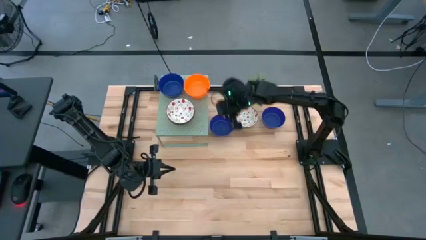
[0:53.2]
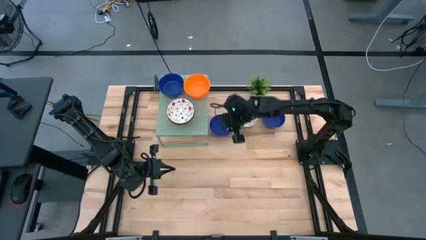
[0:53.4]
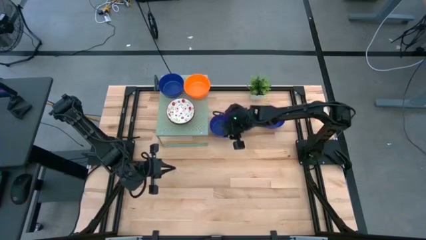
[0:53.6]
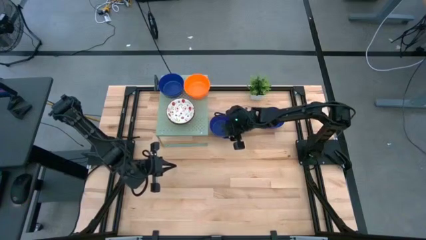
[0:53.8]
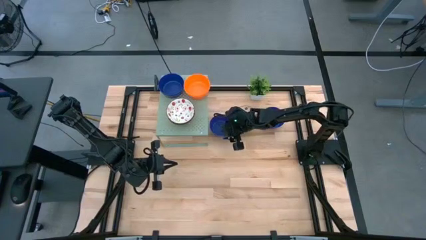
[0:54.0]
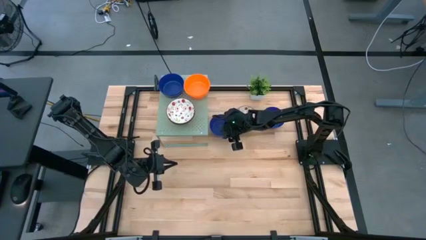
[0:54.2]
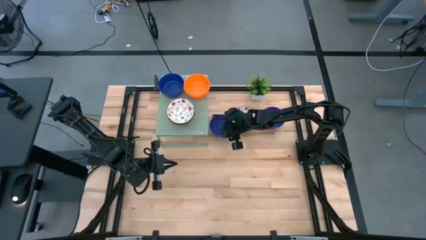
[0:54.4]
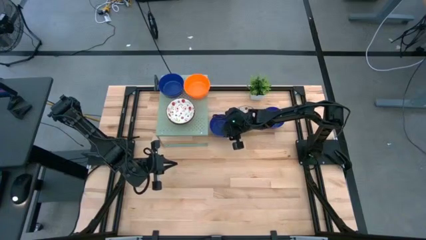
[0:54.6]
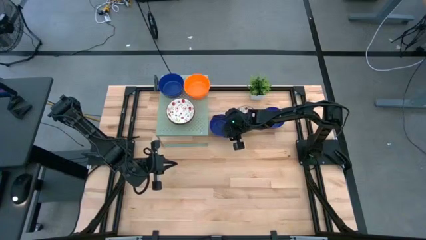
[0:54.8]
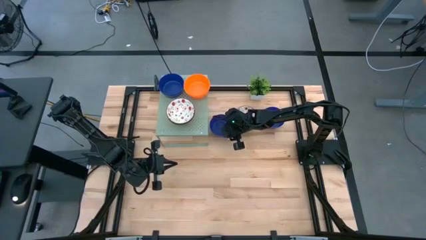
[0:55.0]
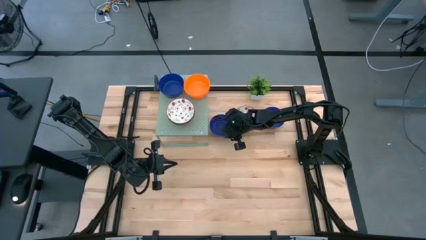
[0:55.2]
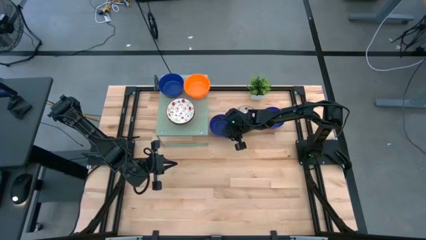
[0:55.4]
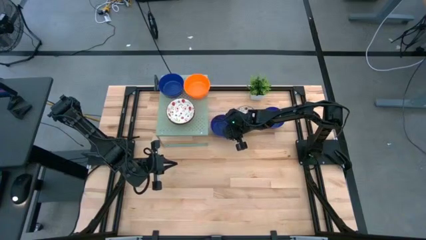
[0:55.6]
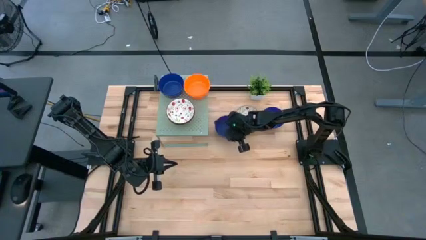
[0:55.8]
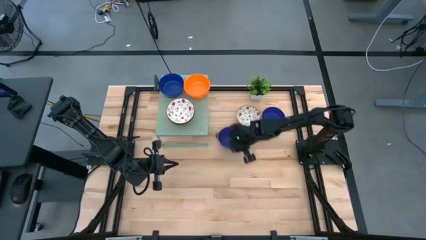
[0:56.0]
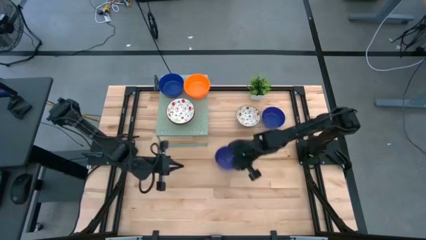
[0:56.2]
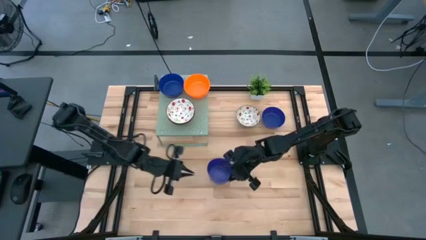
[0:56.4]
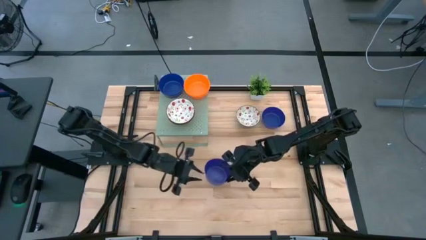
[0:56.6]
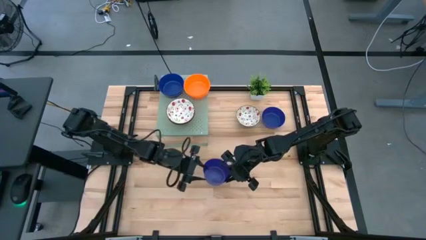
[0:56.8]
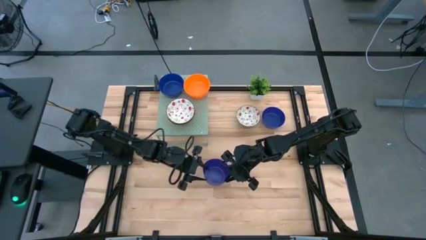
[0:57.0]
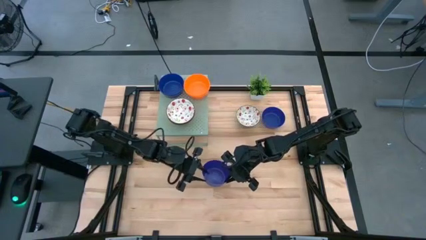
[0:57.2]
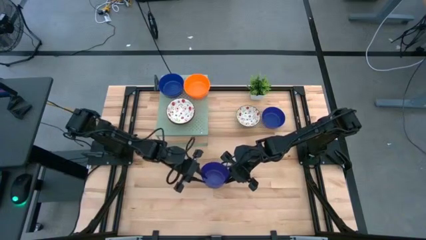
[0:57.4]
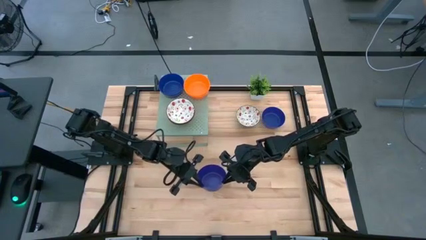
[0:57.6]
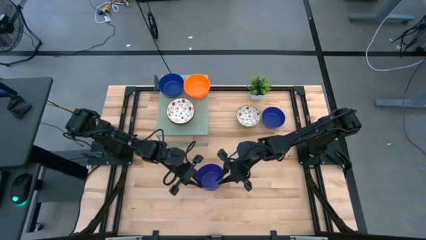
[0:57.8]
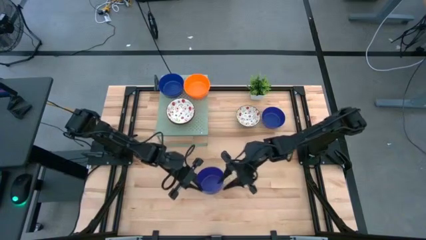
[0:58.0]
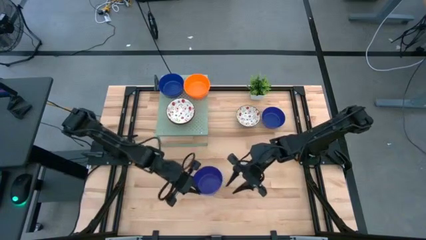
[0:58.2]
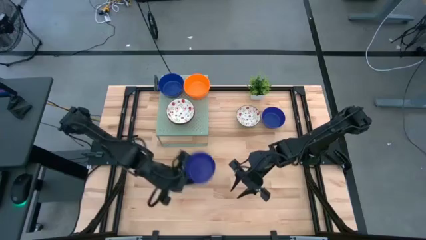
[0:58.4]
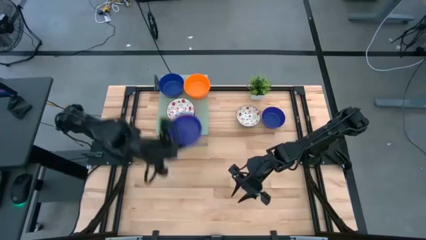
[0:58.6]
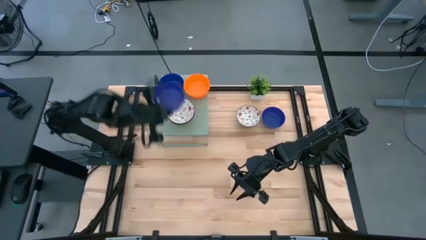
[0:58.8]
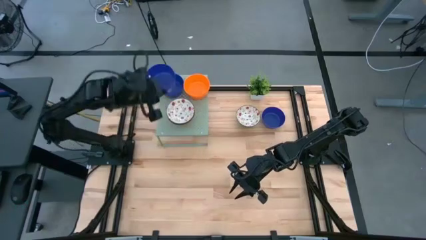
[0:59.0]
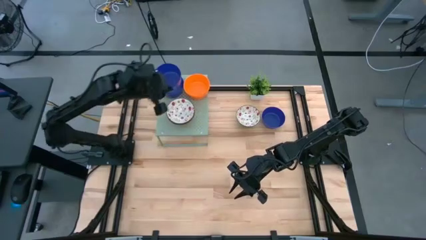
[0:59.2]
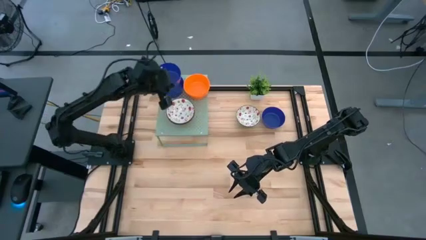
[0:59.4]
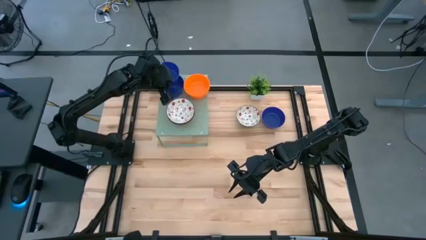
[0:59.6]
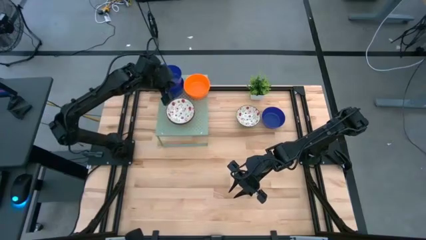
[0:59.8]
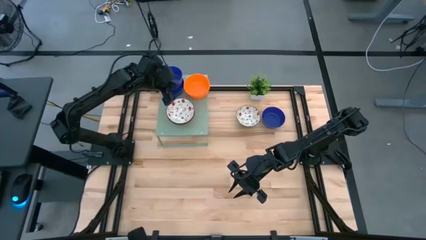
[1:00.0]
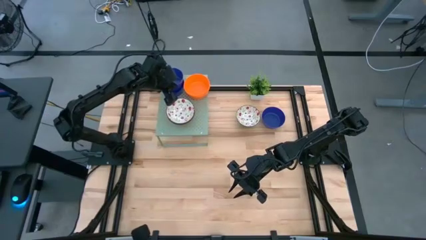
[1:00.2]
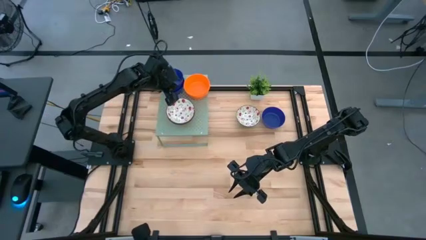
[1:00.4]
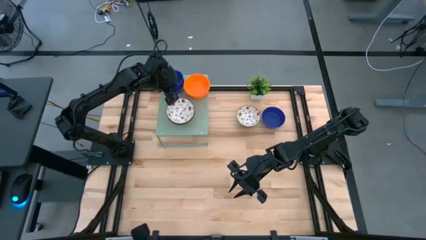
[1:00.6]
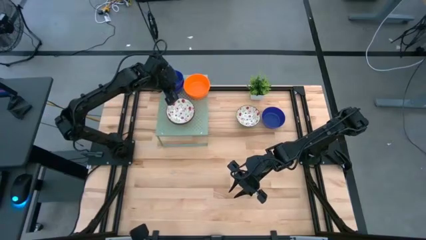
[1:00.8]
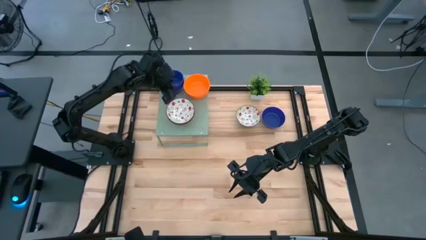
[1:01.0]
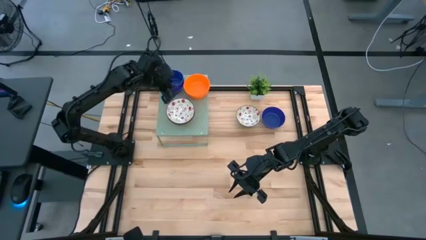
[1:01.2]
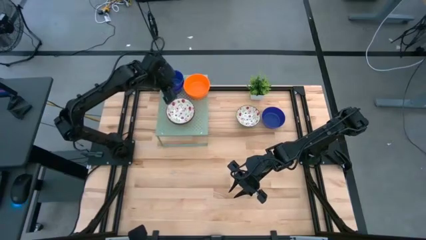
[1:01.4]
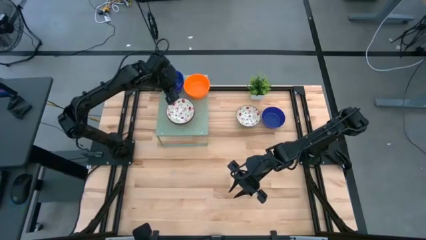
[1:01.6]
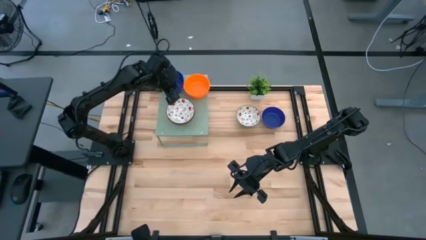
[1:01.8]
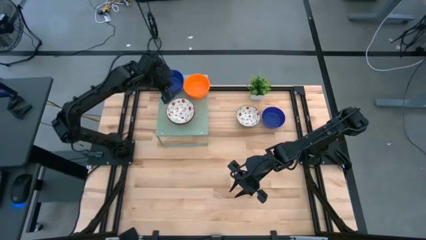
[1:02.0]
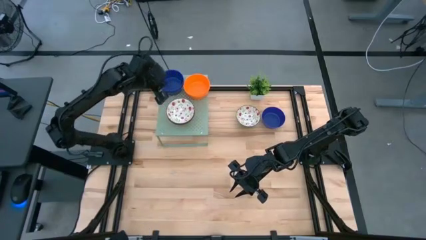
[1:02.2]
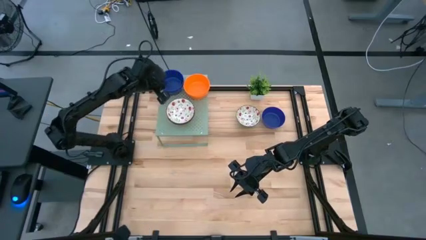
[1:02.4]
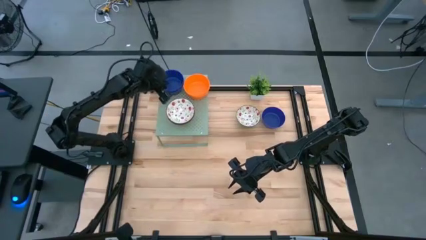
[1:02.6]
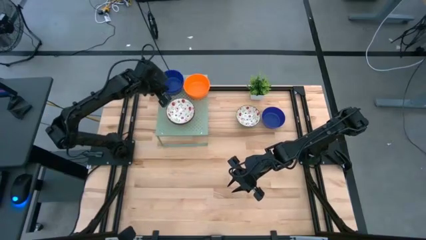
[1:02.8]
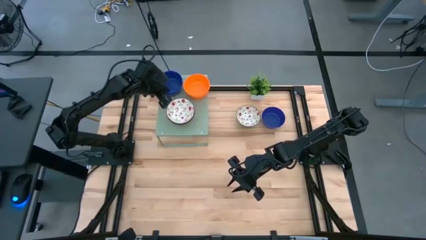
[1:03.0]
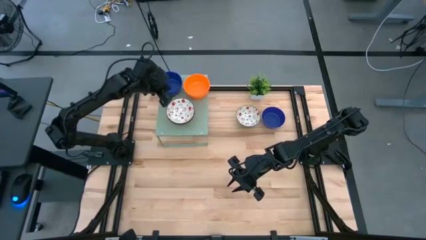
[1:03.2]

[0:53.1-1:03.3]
Task: Pick & Place Mini bowls
Stack the top left blue bowl on the stacked blue bowls on the shelf

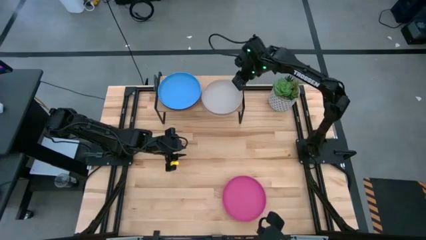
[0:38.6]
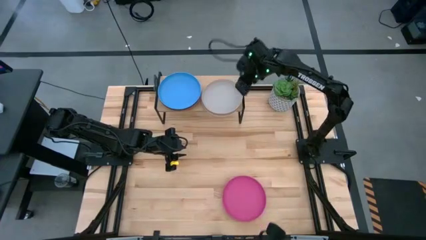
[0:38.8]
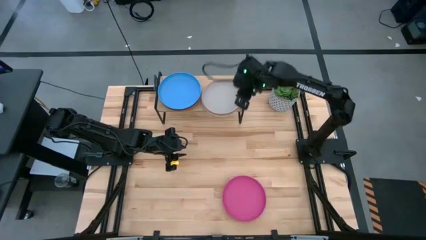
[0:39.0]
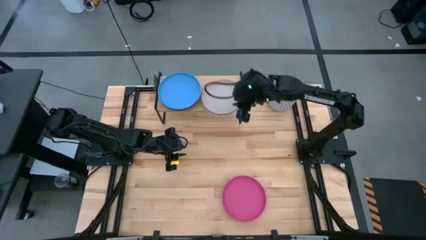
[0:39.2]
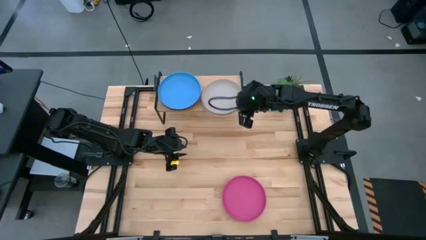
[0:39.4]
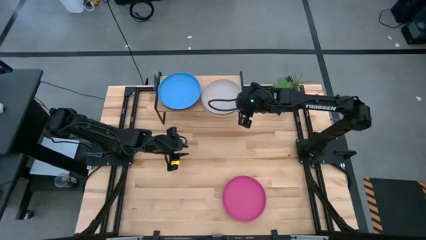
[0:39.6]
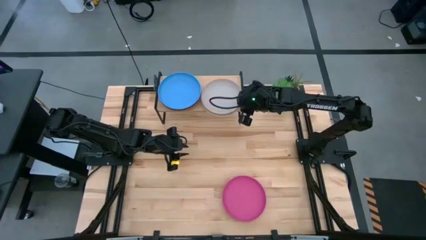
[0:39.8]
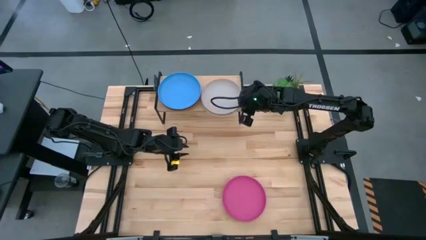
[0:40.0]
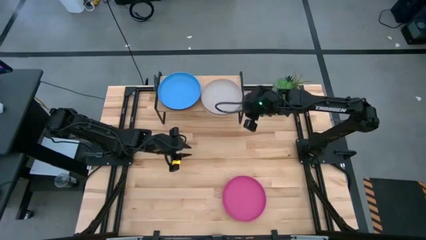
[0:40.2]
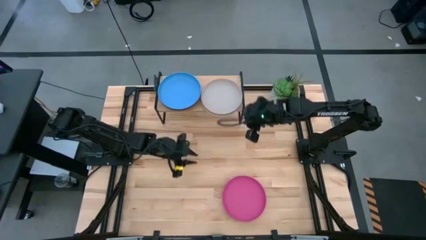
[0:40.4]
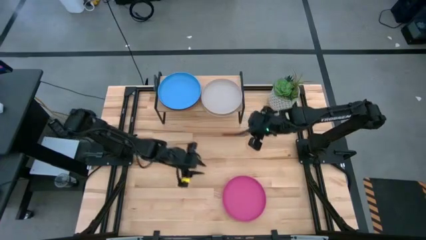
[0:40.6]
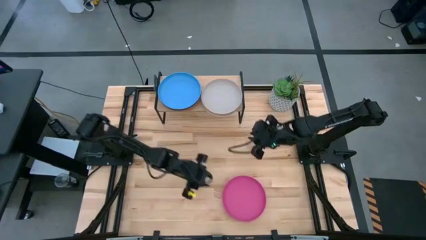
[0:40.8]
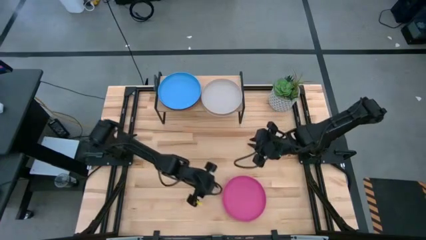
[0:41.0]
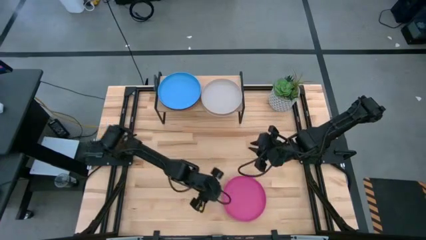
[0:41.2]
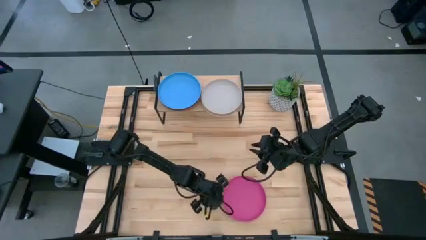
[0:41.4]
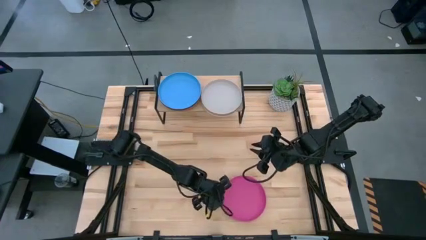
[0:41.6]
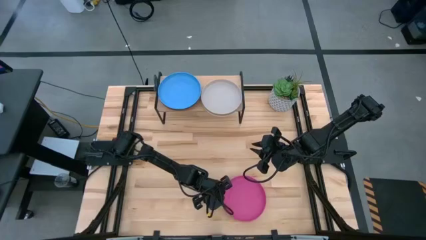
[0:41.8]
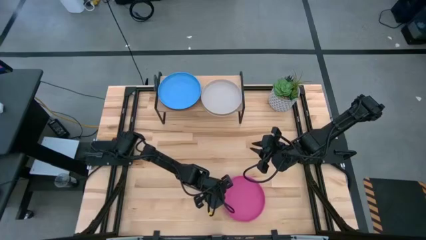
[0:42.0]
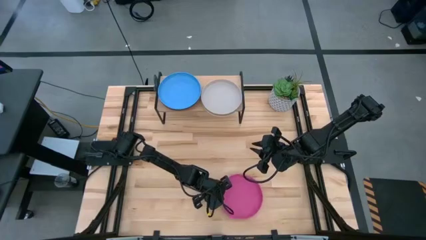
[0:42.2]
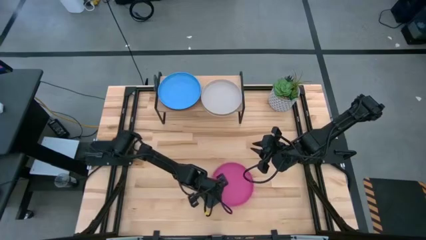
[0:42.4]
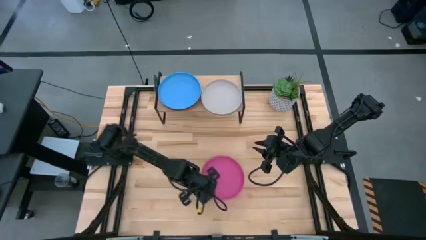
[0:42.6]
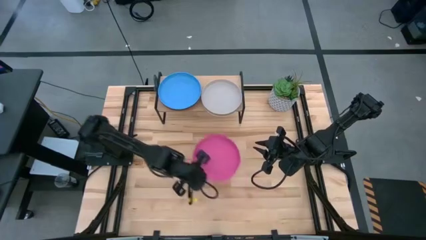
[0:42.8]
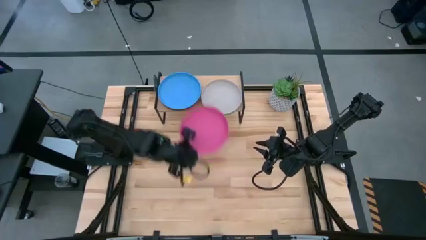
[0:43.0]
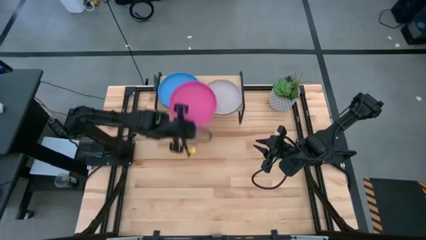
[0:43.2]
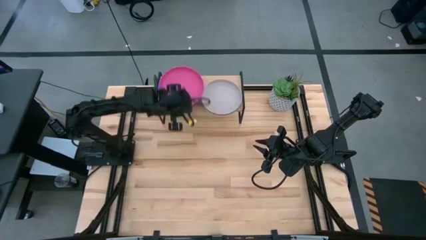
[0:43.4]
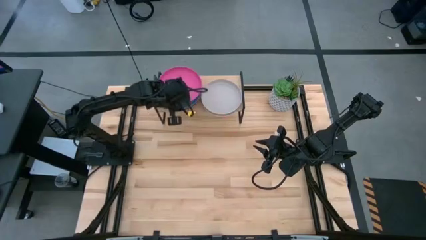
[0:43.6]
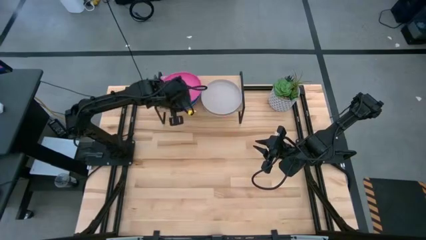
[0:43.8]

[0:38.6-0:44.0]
Task: Place and stack plates onto a shelf
Stack the pink plate on top of the blue plate on the shelf

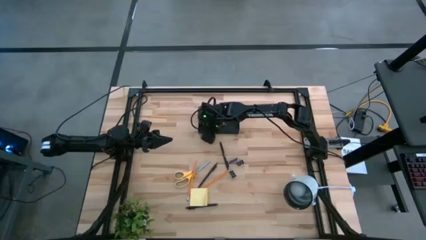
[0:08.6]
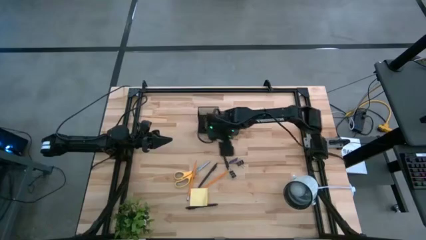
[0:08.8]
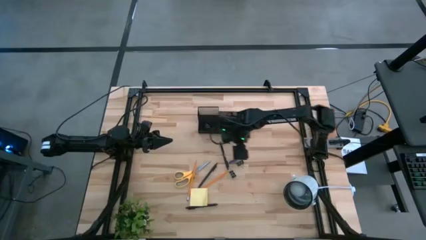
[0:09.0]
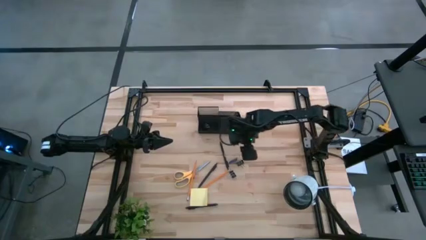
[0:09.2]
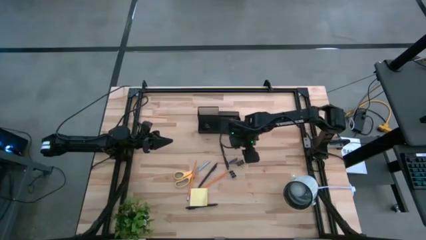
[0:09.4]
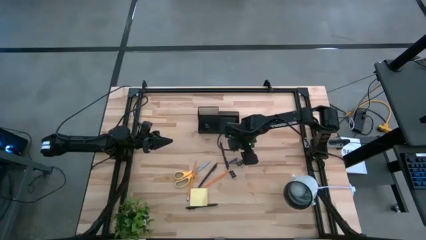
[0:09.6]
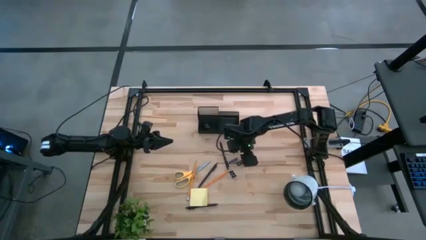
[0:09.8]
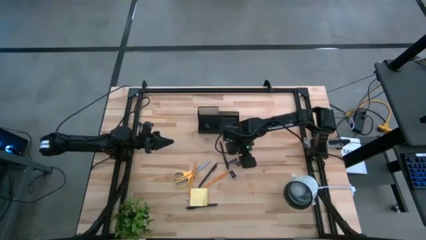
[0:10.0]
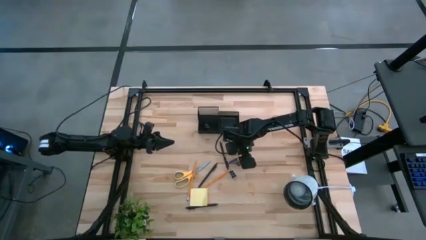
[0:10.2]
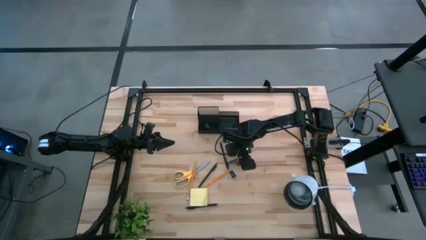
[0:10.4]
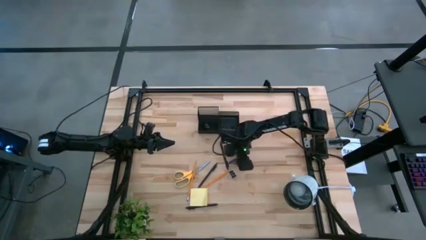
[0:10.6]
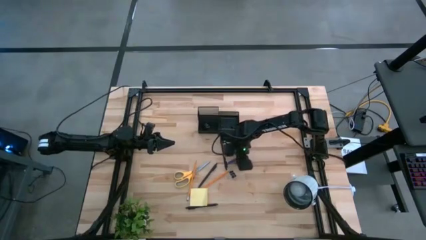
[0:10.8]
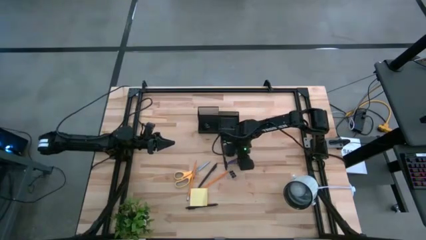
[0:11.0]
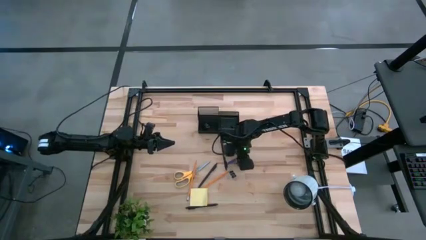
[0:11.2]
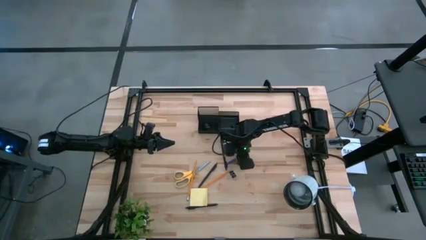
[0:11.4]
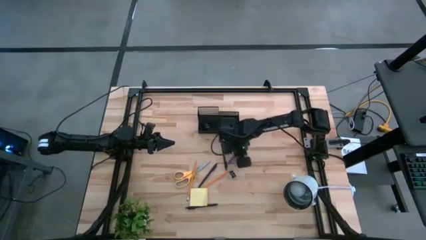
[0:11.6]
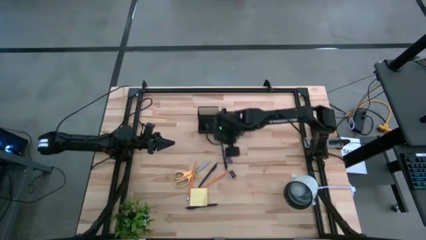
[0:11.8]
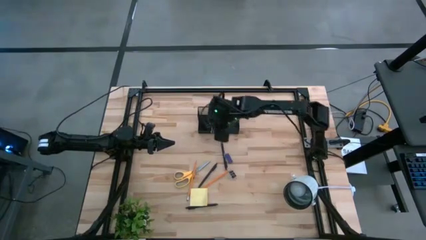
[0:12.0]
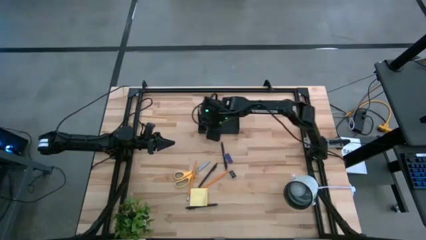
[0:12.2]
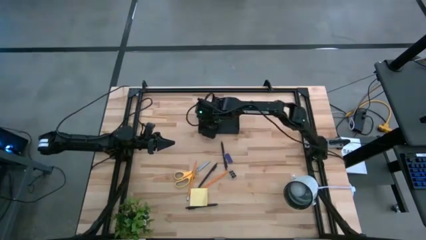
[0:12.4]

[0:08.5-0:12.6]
Task: Pick and place office supplies into organizer
Put the top black binder clip into the desk organizer
